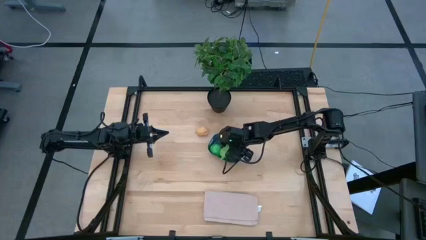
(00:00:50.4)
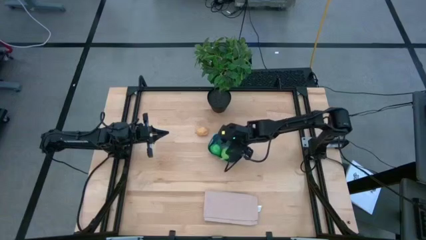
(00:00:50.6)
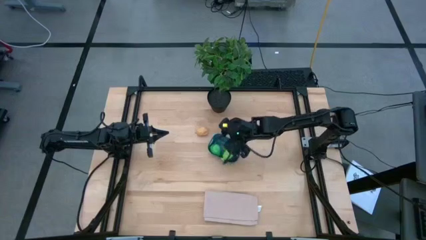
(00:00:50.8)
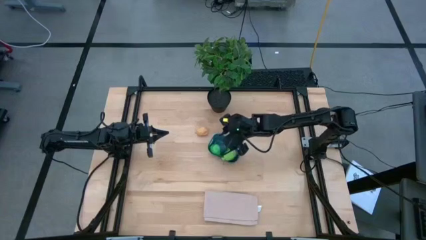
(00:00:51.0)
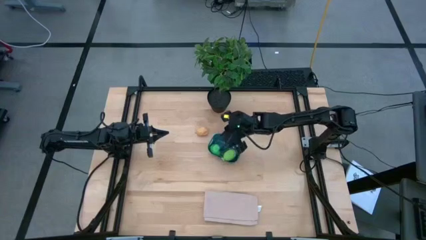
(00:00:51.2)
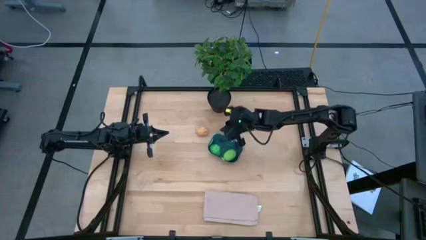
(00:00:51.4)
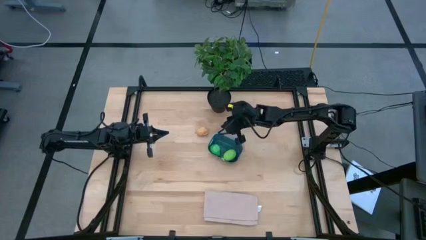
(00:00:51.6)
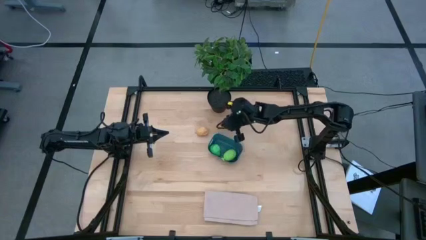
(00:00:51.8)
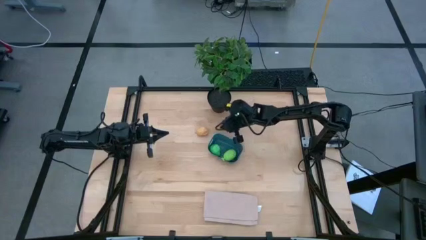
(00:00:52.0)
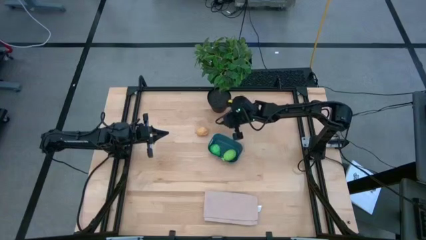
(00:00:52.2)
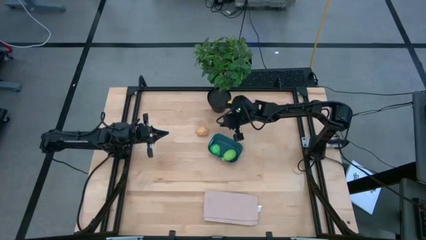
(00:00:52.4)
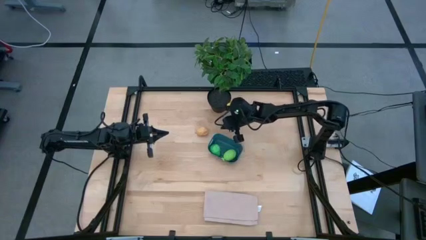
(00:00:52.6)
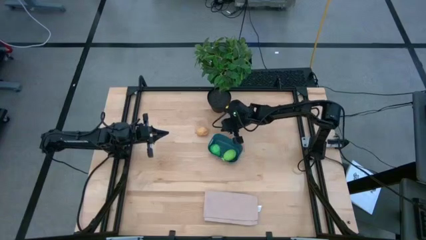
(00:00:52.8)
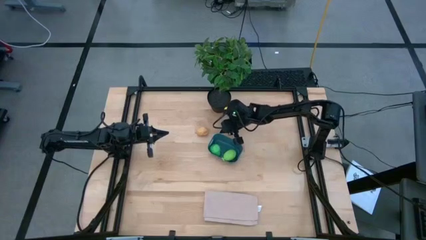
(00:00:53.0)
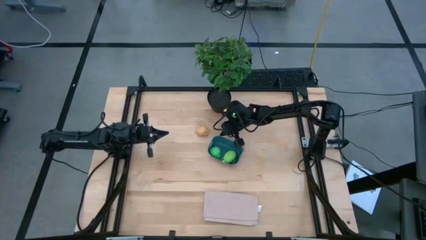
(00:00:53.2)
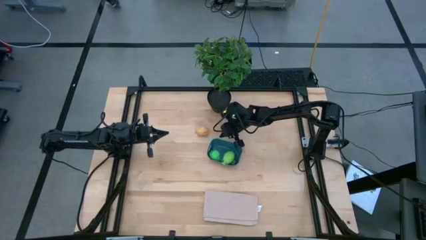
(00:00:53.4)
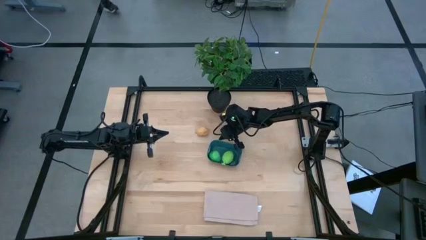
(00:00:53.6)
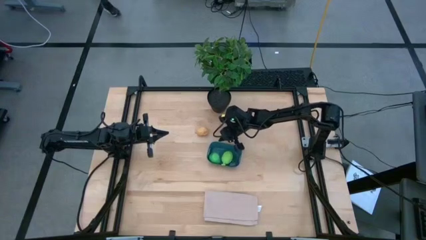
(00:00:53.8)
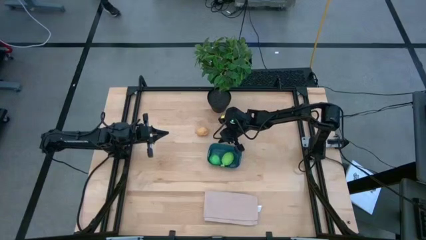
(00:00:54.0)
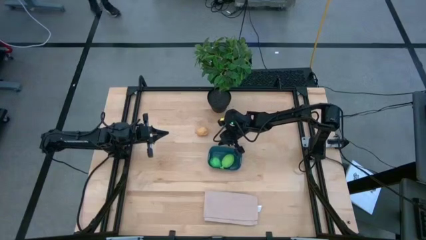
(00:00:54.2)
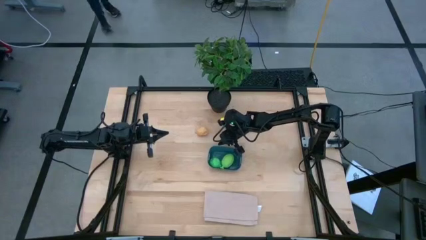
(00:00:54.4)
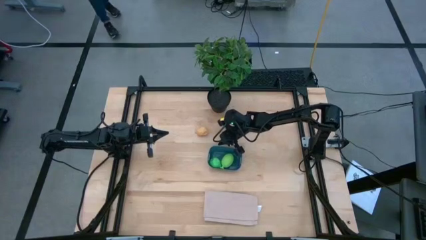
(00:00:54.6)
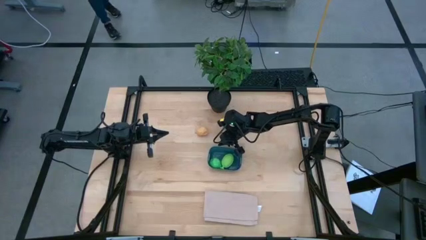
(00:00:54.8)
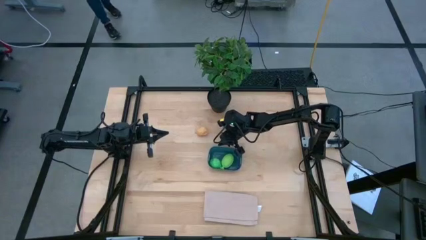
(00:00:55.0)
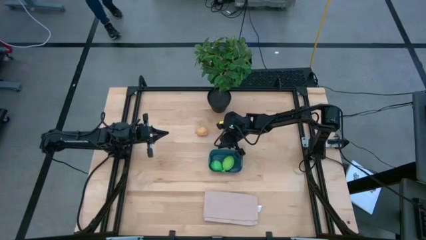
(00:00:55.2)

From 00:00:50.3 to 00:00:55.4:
Task: Pick and placing Produce into tupperware
Adjust the blue container

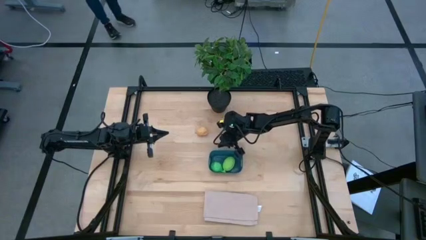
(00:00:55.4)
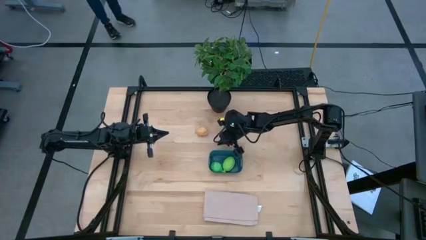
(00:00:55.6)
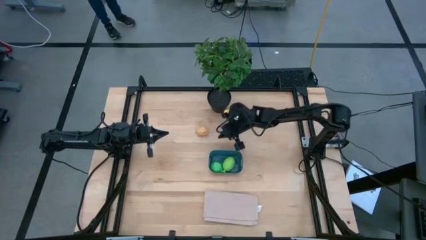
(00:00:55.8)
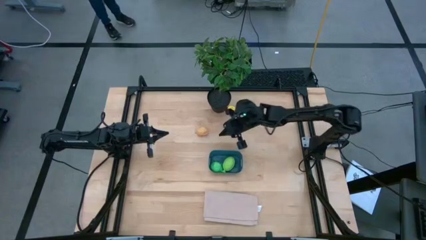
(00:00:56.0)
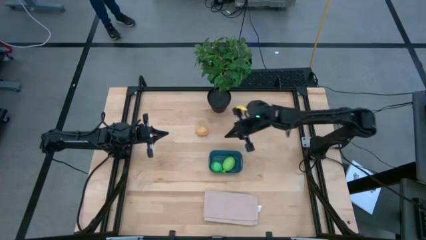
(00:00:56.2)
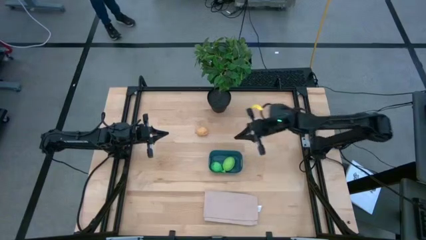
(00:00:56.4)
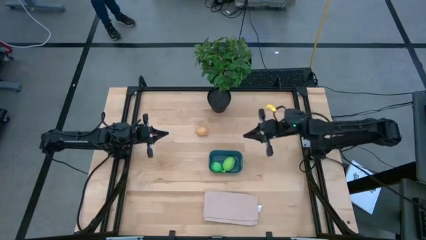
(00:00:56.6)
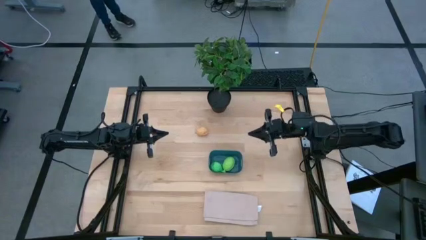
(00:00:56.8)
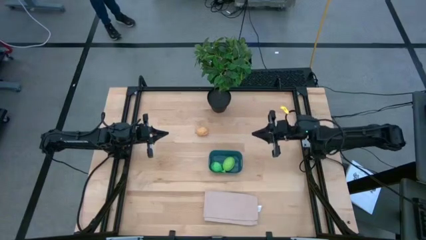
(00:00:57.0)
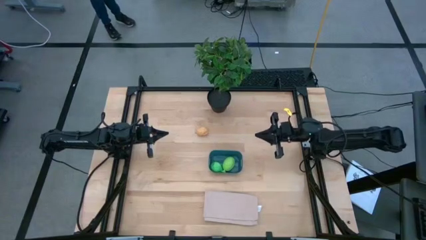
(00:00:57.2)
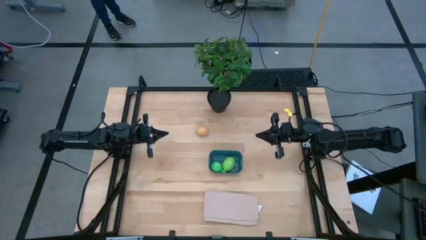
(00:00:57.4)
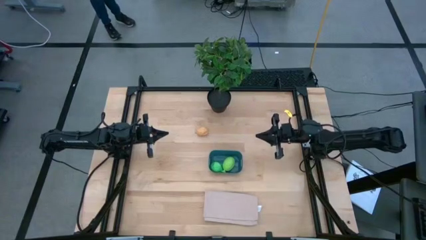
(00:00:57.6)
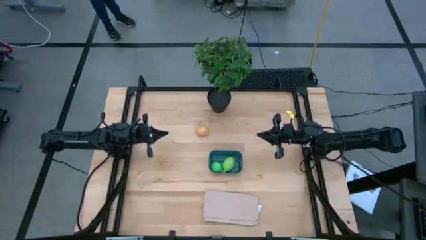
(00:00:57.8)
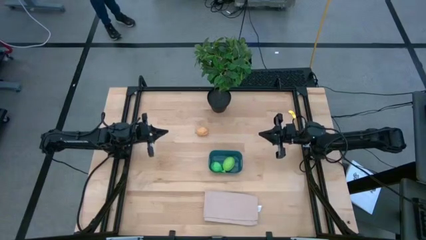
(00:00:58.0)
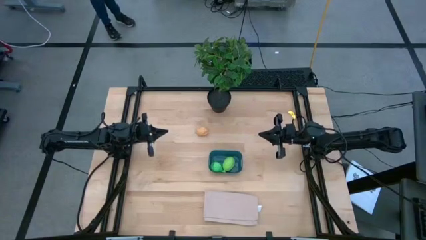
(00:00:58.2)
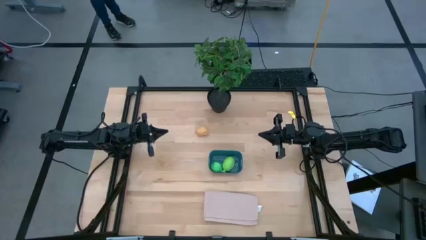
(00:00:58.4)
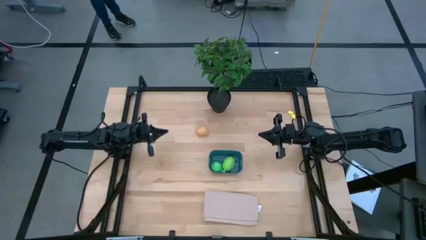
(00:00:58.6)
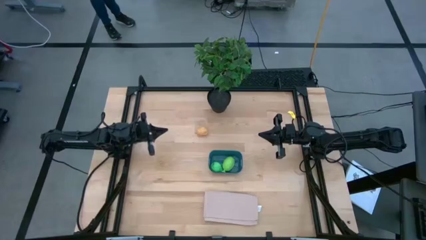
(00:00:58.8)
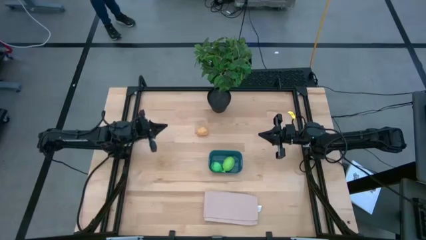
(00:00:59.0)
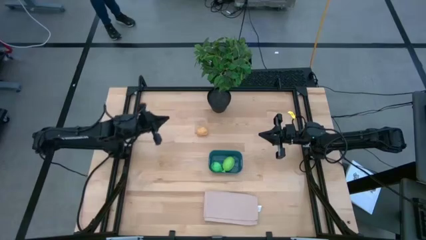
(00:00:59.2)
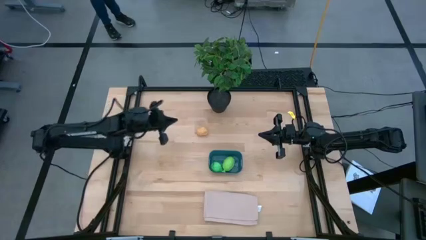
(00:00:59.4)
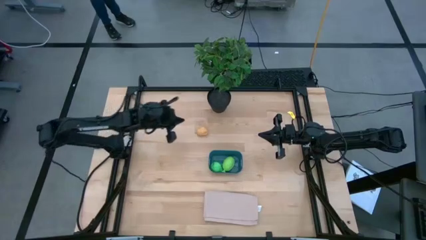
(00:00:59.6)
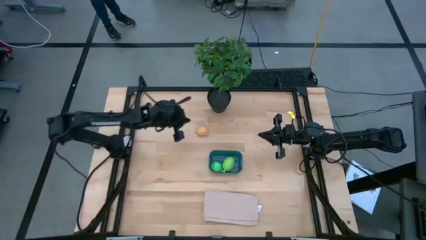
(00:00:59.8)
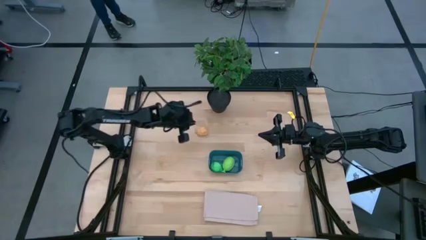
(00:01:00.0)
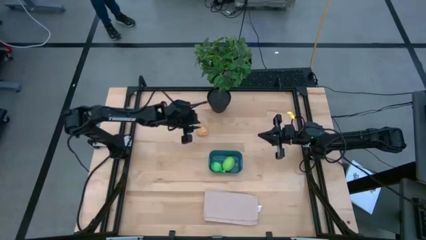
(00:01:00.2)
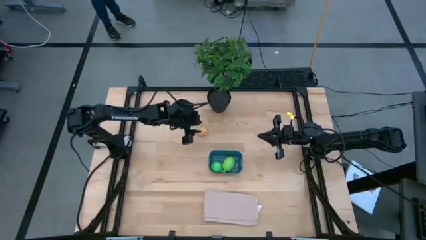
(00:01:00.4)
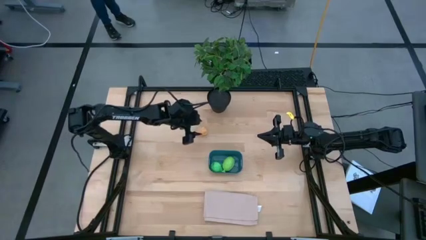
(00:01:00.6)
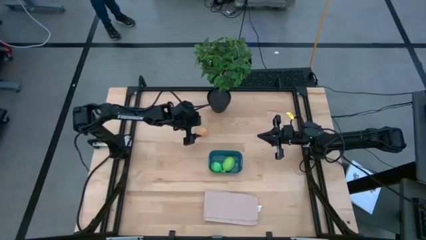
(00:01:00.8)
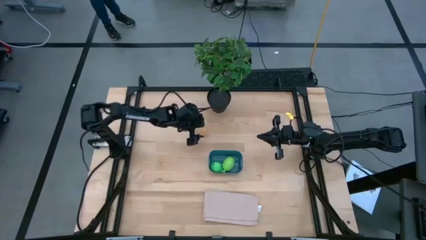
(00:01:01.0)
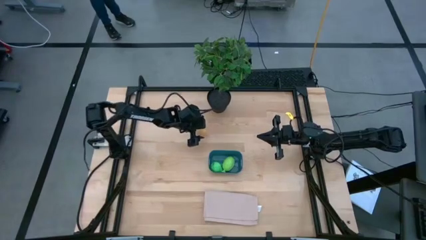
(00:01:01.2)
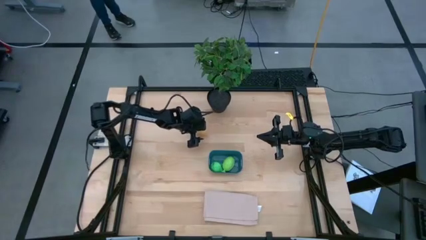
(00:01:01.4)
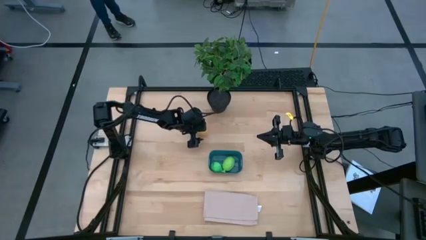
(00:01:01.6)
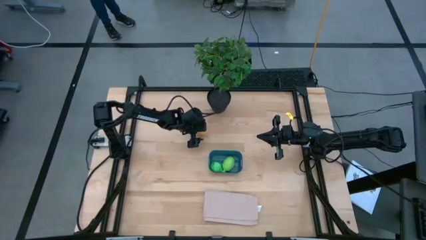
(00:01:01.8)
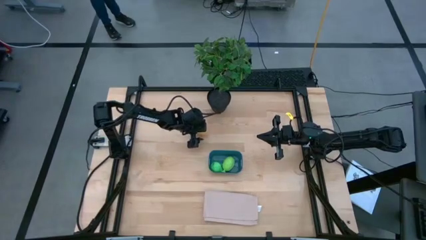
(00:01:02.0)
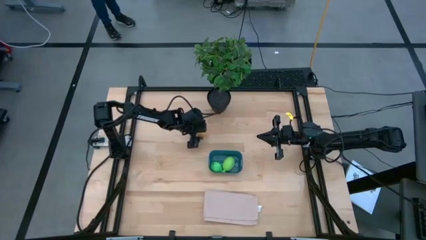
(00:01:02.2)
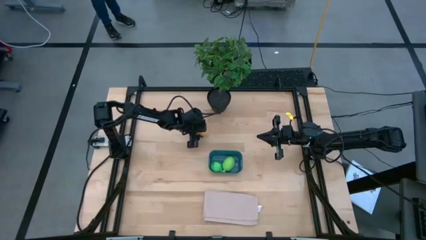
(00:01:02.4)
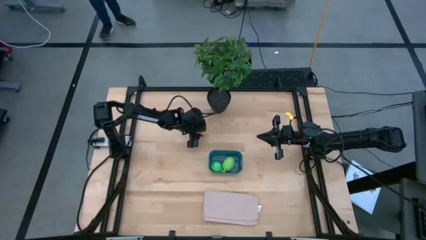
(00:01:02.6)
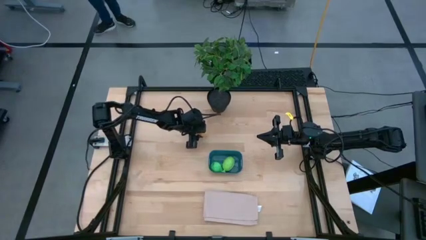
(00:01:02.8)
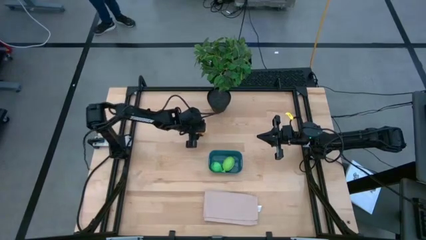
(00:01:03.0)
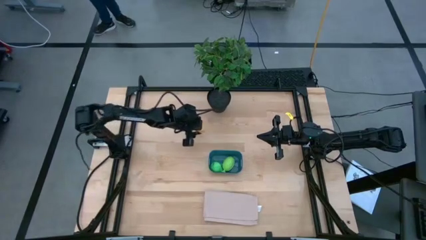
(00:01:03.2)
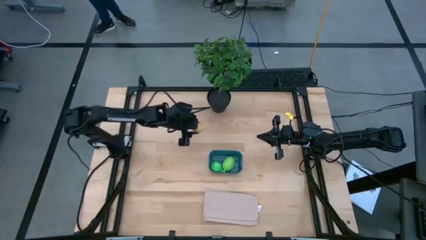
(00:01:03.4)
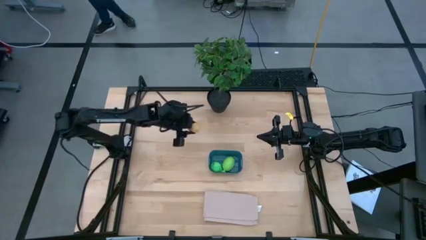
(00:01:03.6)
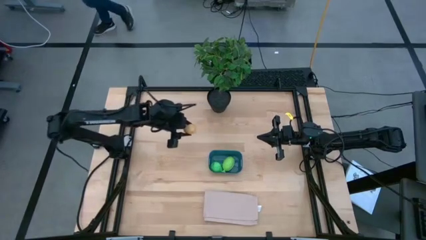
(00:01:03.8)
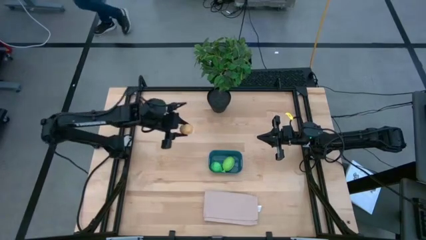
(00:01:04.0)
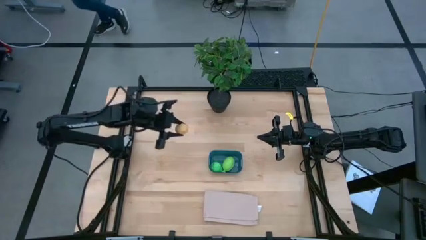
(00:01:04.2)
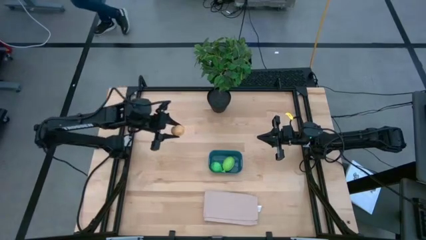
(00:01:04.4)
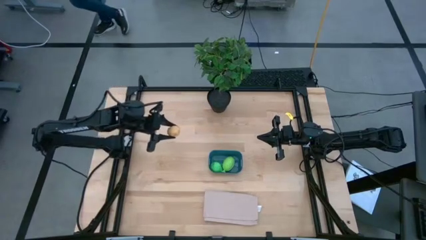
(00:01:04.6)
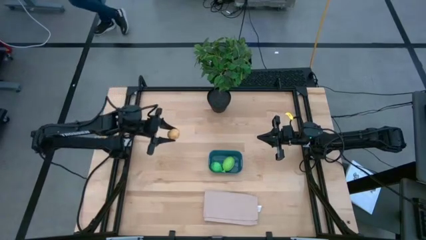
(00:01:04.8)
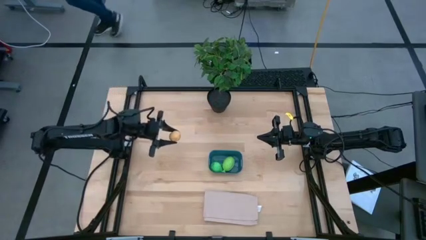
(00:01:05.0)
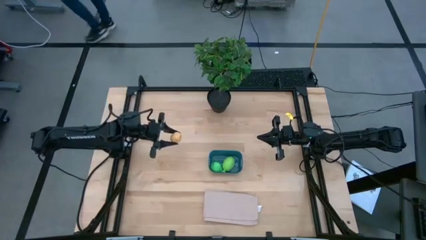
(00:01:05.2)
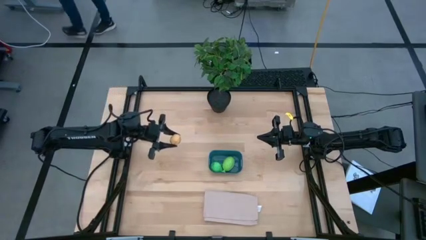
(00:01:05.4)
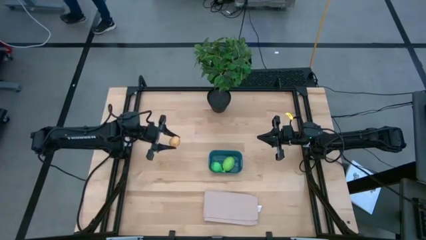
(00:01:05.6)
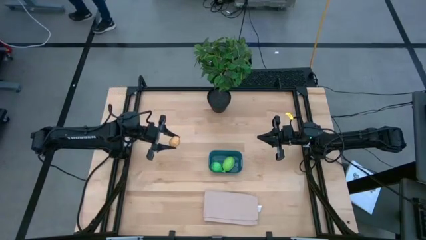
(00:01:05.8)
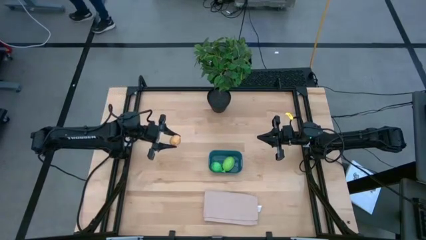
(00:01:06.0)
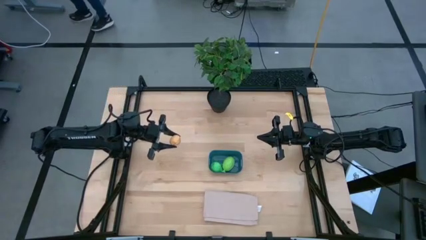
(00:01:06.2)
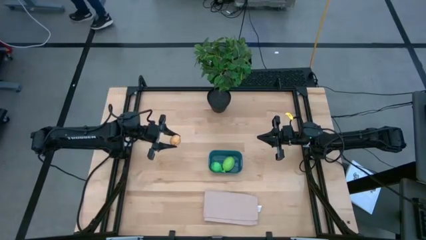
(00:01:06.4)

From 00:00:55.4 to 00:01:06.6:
Put the potato into the blue container
